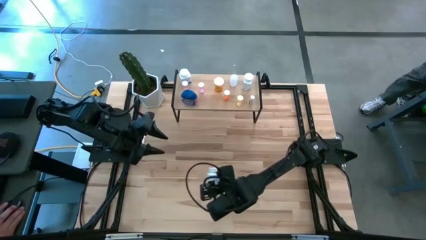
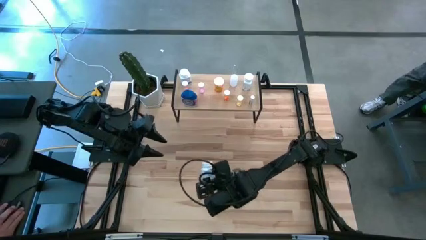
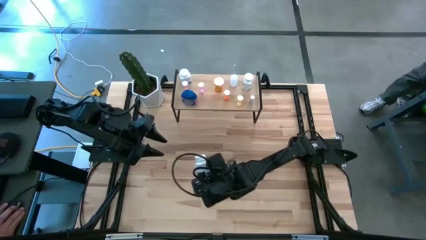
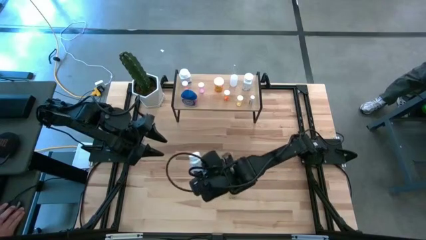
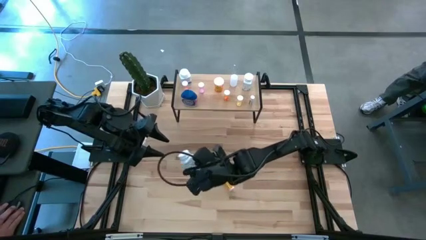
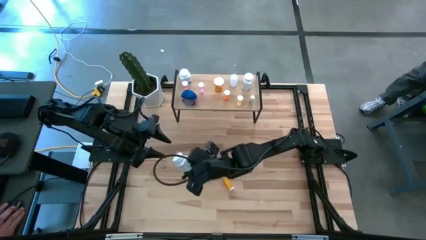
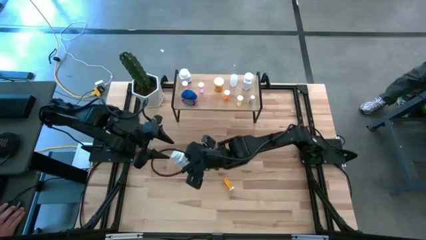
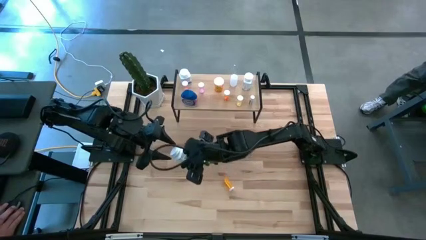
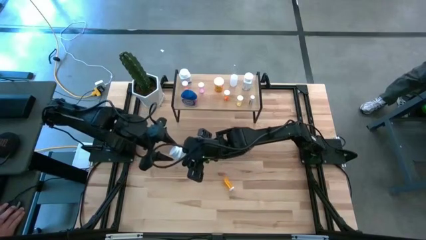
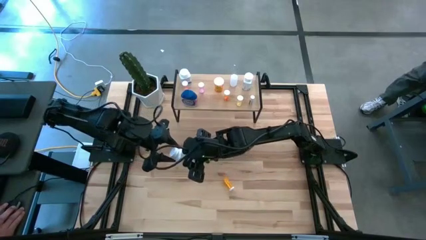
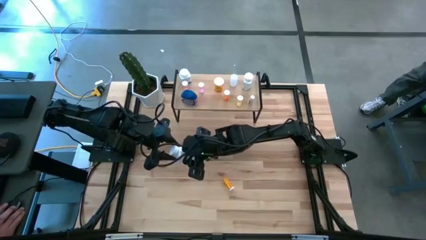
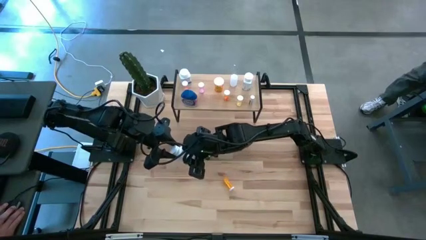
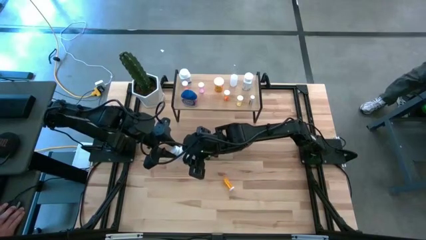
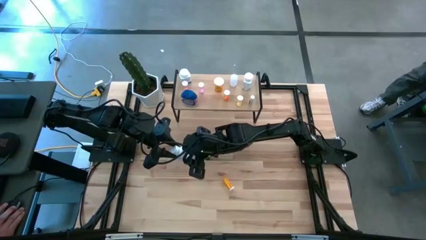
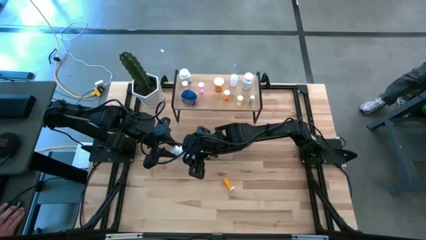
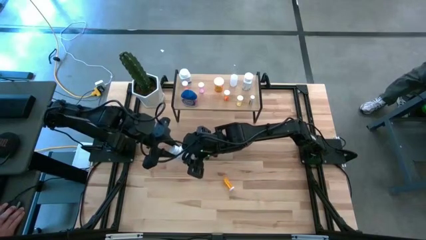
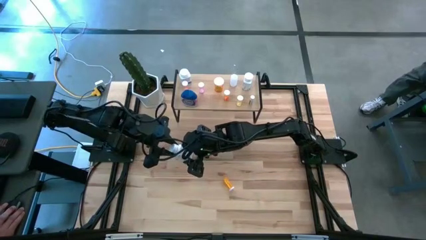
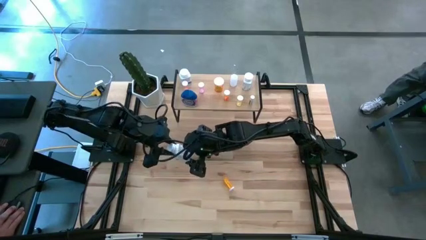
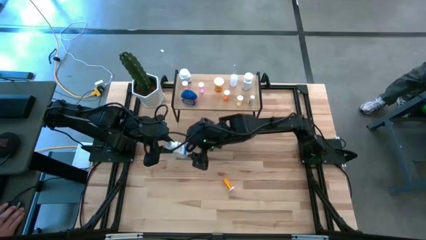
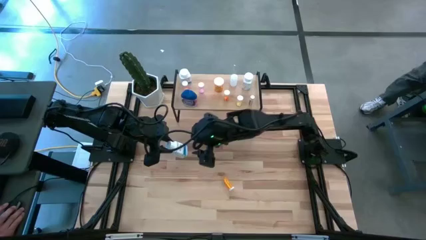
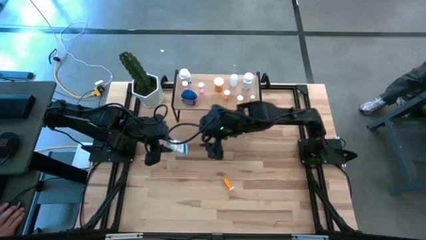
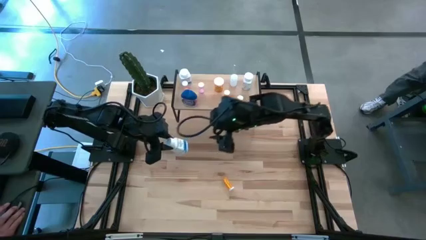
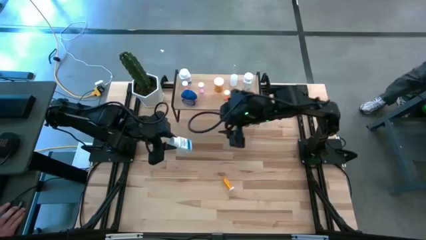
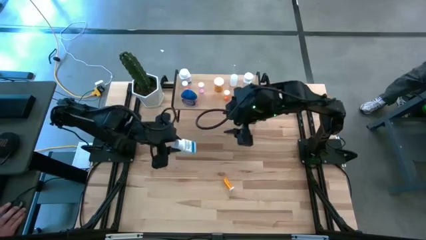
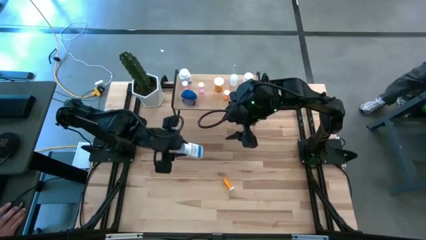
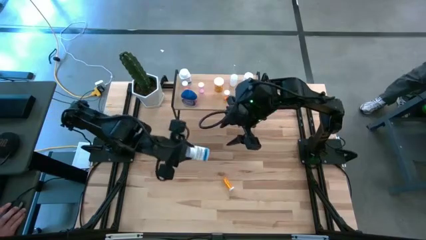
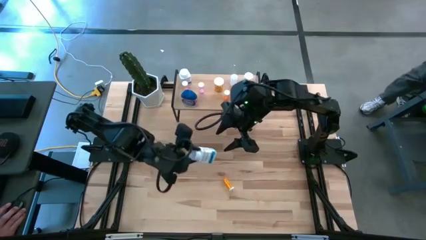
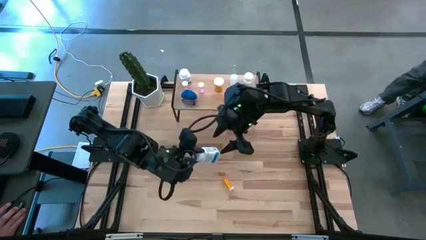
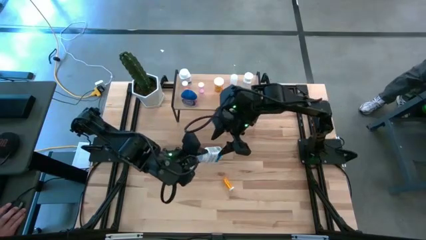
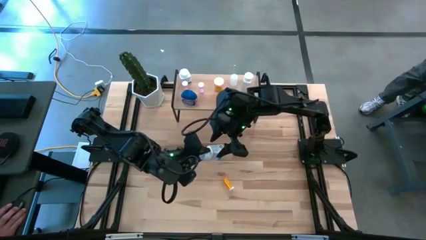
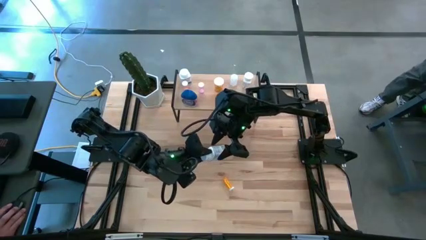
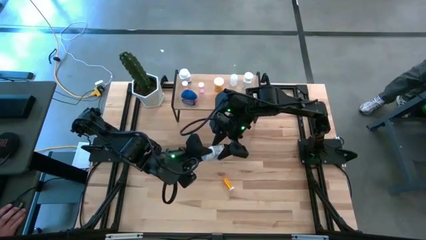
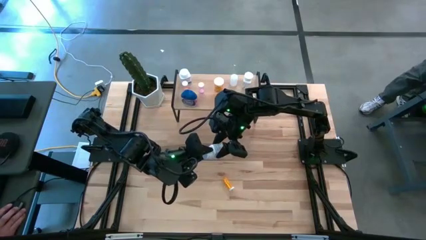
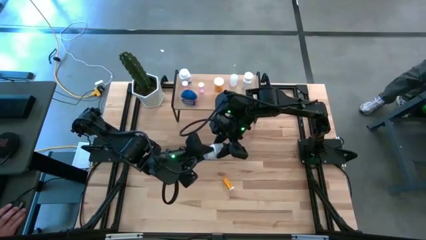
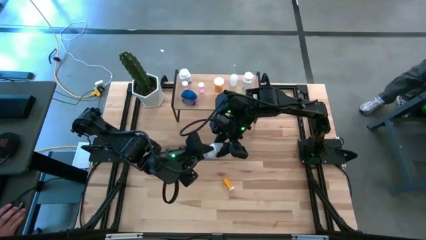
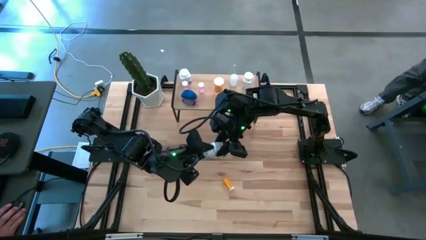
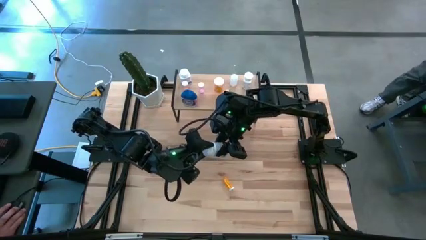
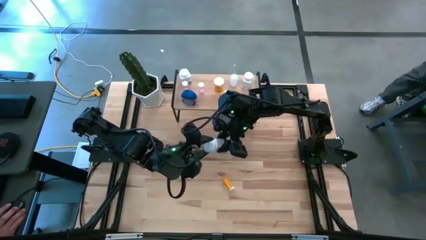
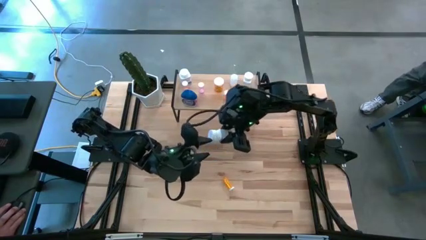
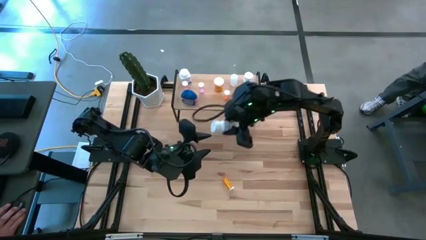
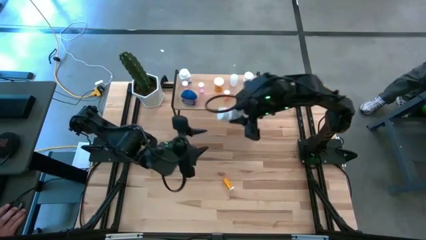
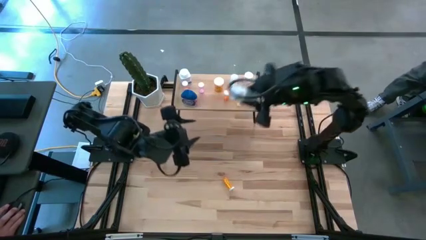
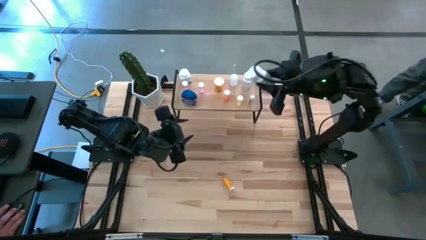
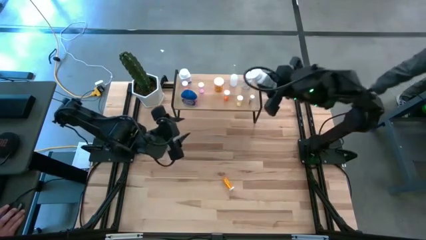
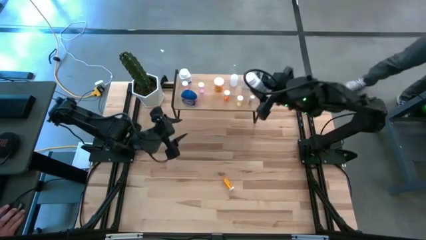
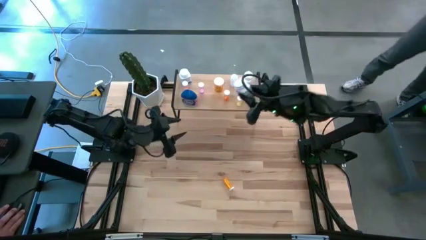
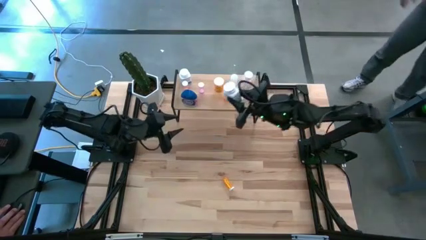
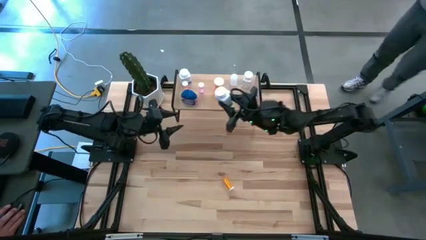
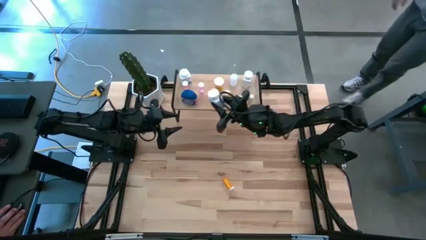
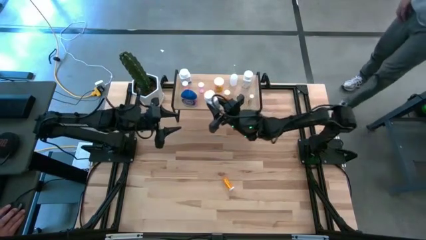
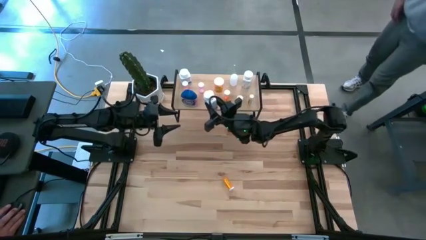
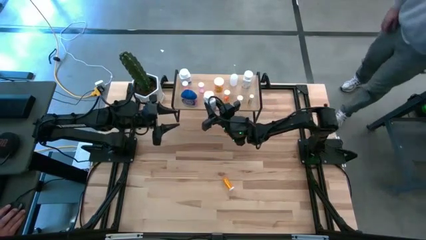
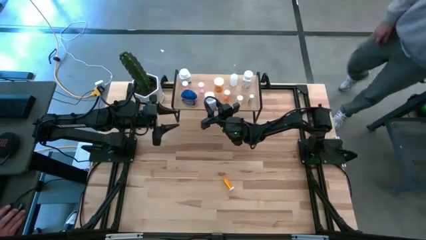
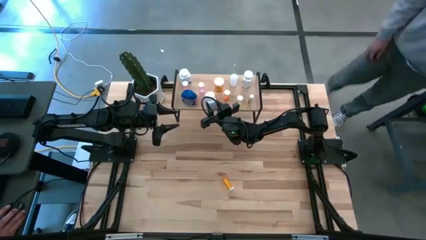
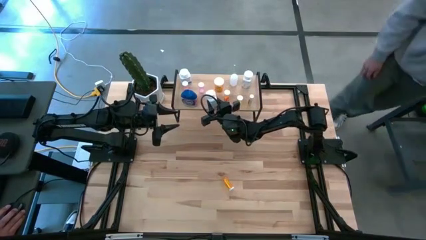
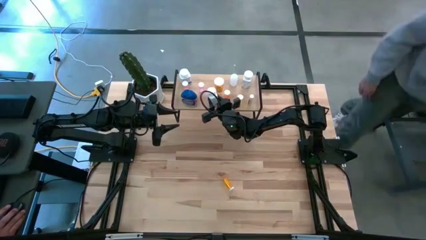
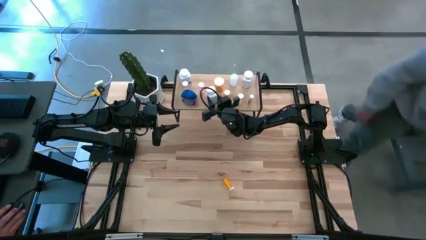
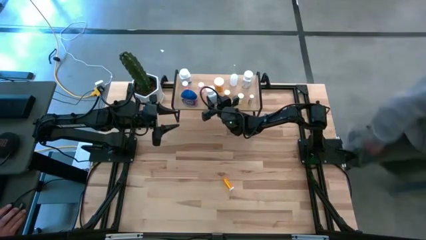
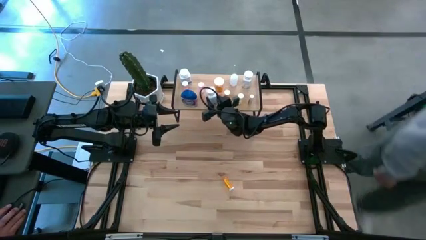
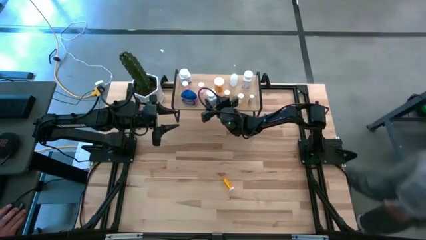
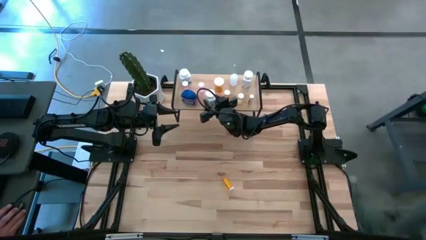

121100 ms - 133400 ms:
Task: Pick and place medicine bottles onto shelf by color
Put the white large pill bottle on the shelf

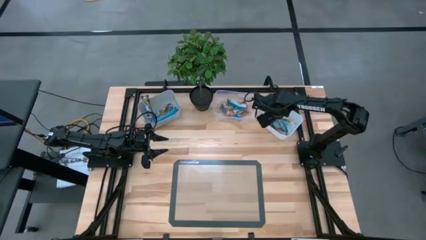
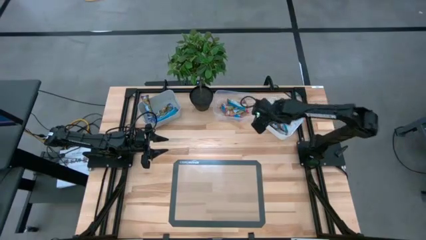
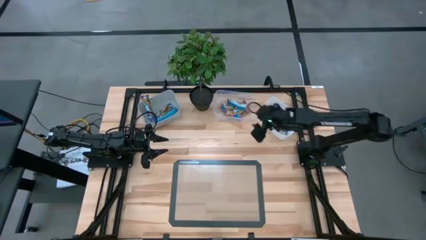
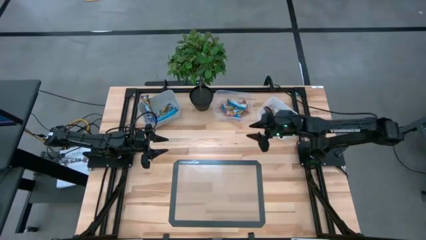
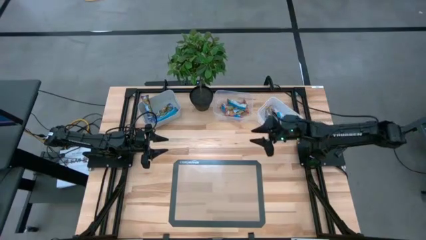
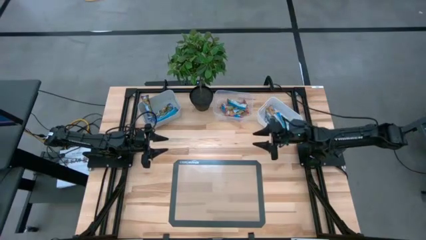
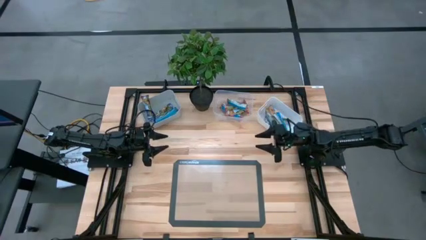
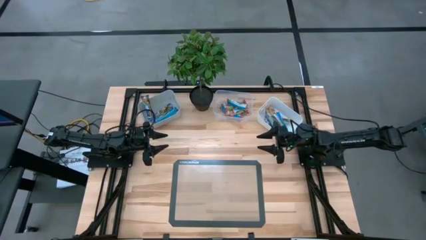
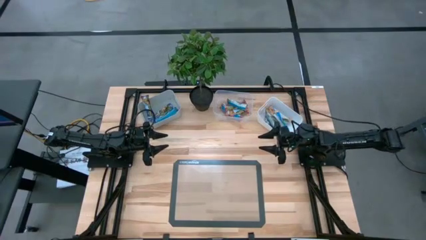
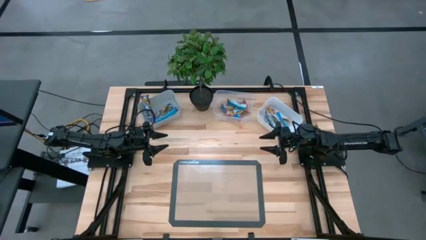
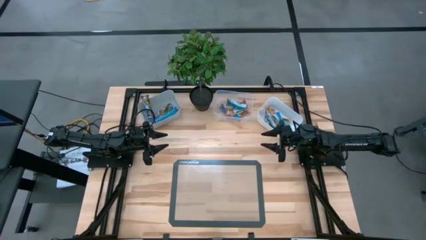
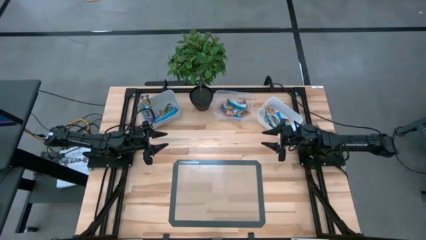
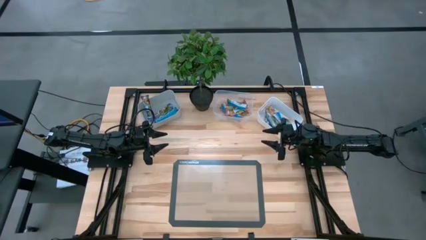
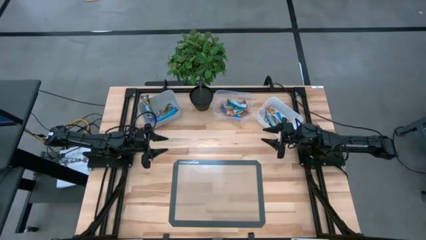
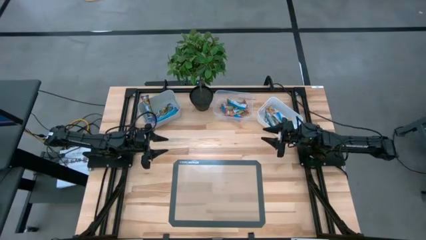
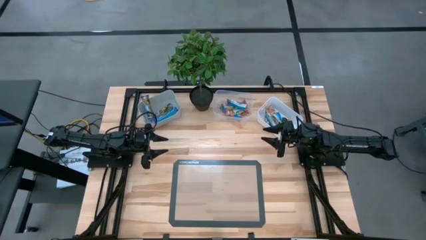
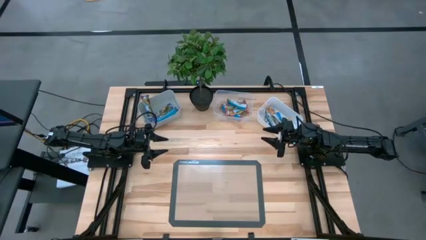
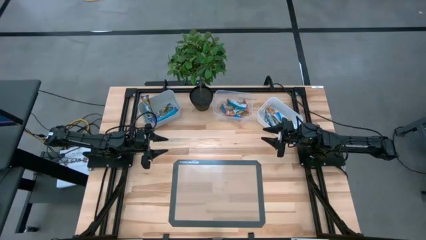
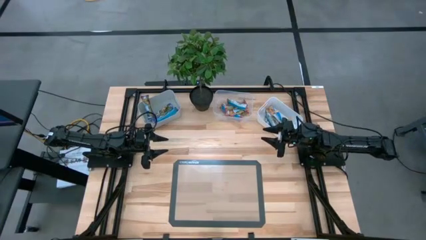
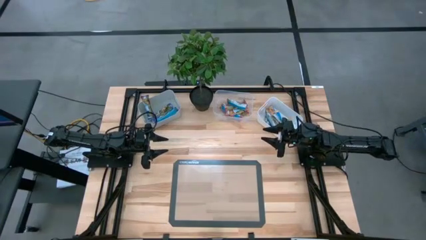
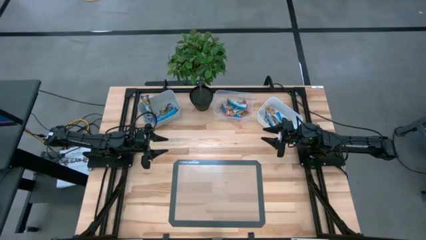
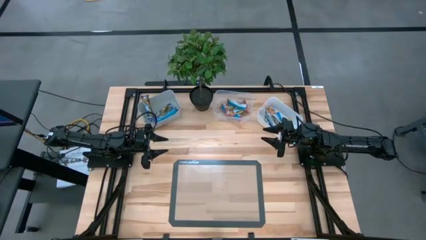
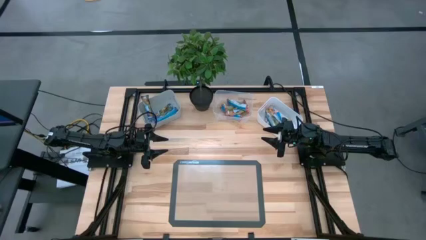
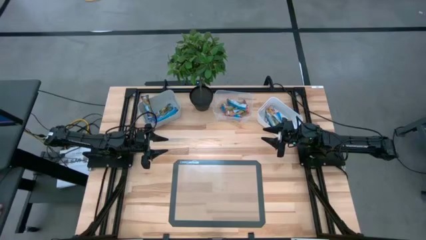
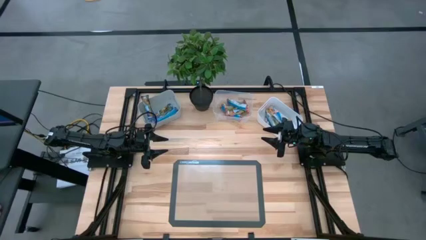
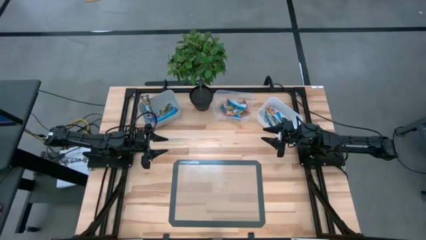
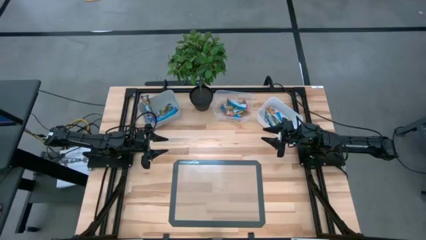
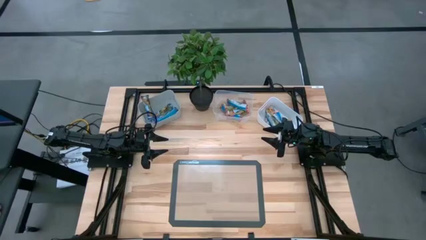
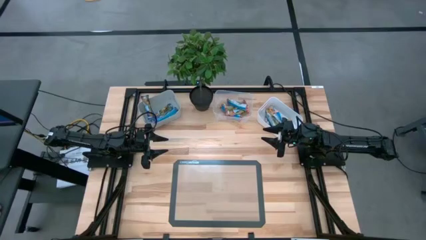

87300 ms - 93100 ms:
Task: Pick and place Granola Bars by type
Return to Home Position
